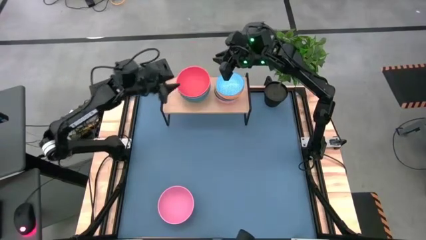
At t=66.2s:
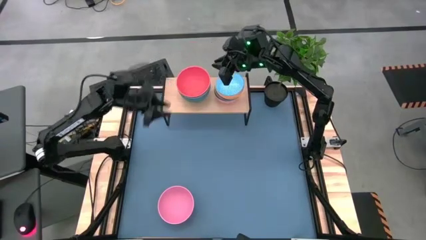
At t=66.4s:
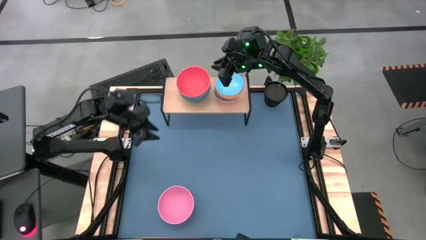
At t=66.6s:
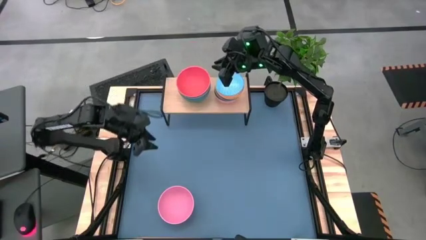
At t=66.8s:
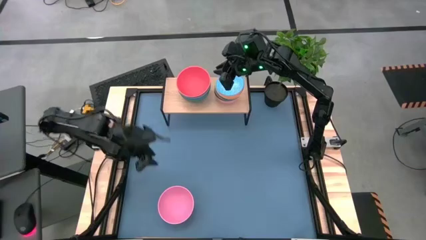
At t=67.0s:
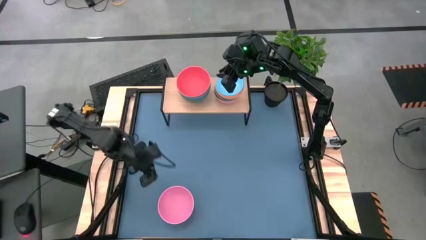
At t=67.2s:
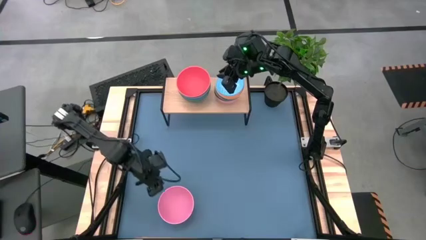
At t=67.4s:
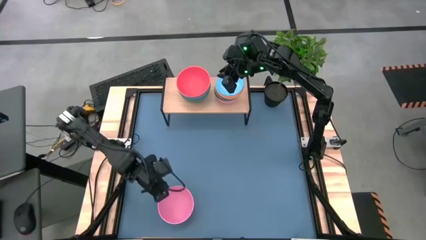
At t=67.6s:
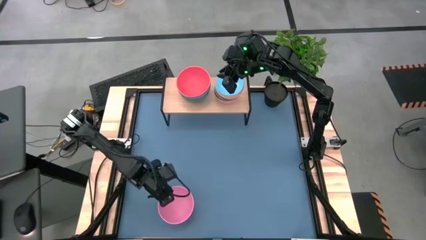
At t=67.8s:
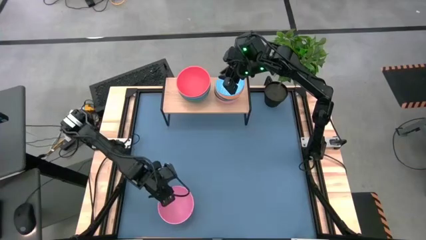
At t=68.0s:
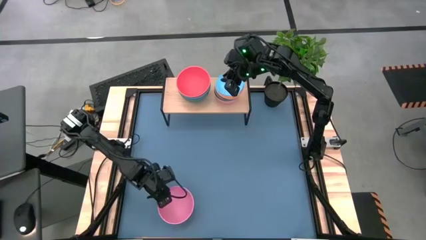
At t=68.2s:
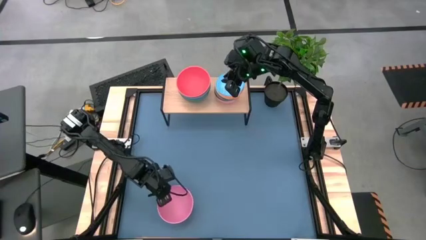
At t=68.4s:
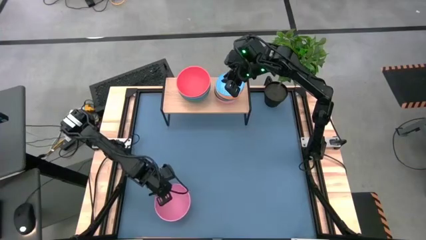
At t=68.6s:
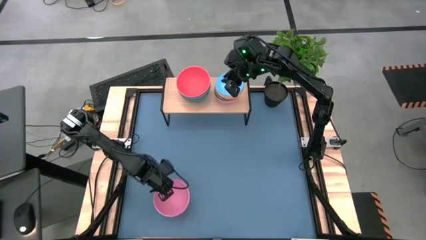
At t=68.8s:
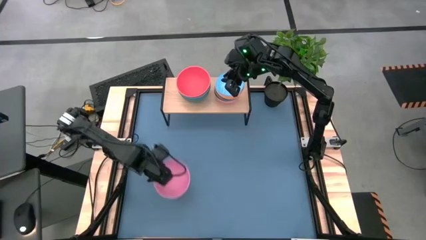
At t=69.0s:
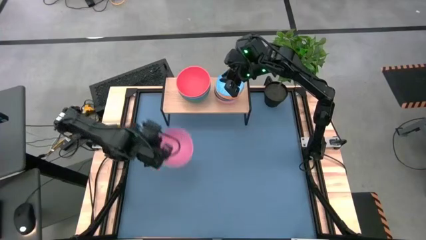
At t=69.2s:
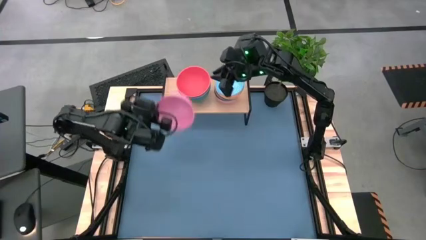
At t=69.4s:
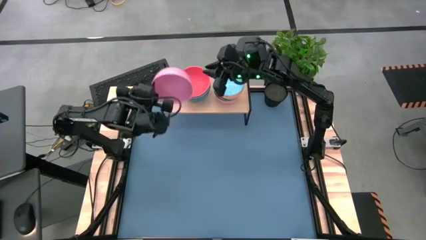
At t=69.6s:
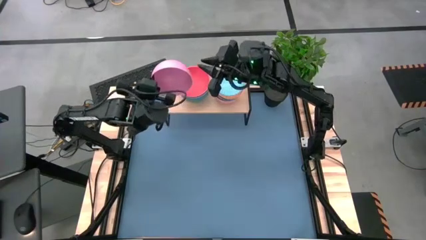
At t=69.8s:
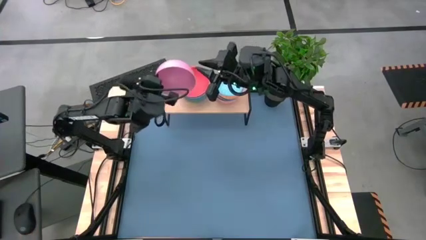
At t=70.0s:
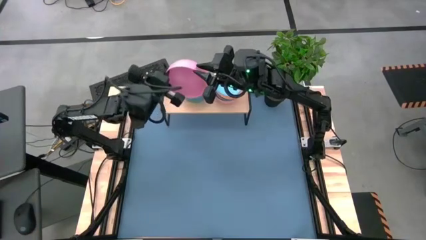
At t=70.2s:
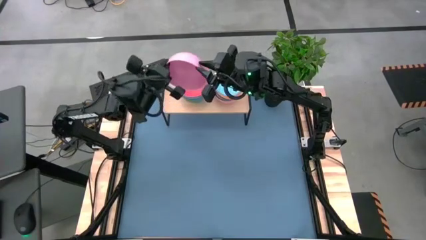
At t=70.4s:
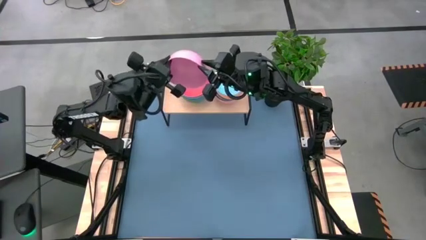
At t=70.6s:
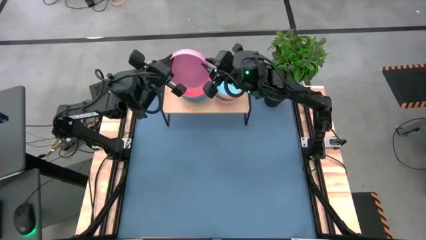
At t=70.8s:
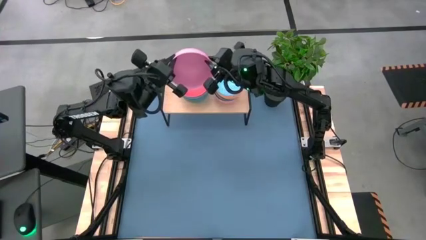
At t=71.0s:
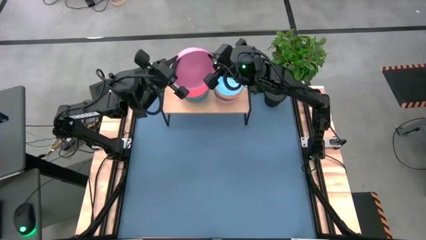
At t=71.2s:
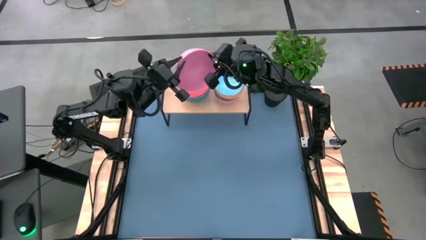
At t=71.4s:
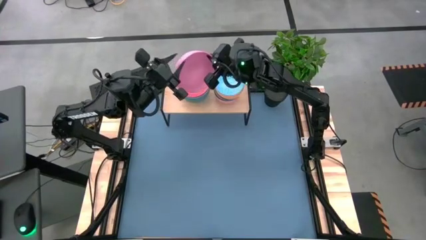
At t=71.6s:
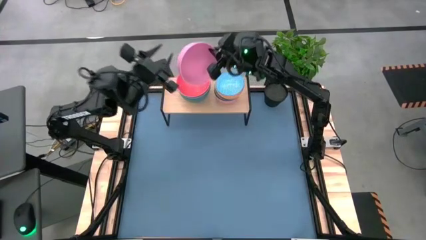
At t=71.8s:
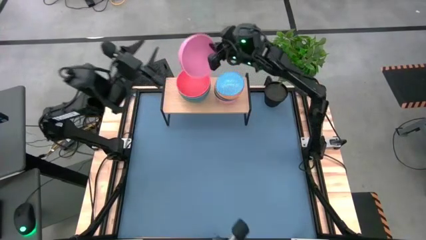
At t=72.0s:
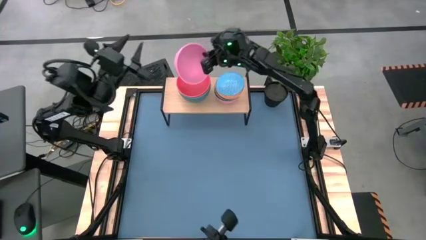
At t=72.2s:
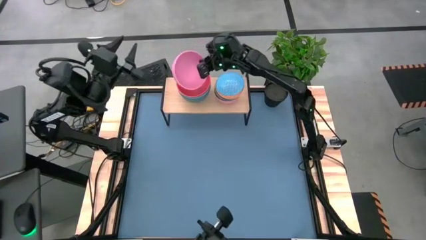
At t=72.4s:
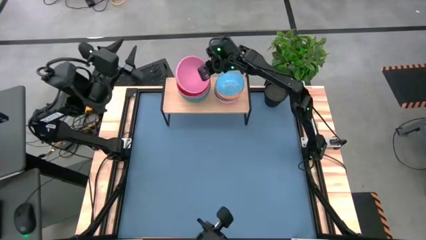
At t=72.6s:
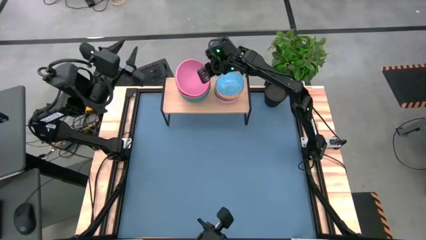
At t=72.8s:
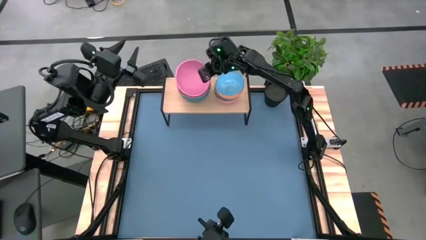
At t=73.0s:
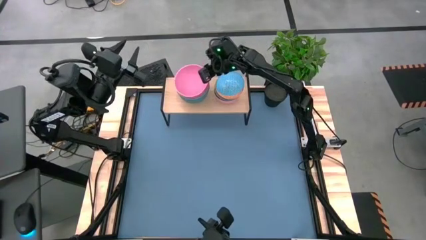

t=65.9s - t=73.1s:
Task: Place and stack bowls onto a shelf
Stack the pink bowl on top of the red bowl on the shelf

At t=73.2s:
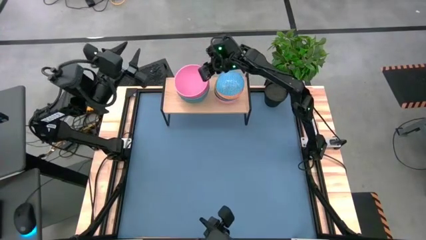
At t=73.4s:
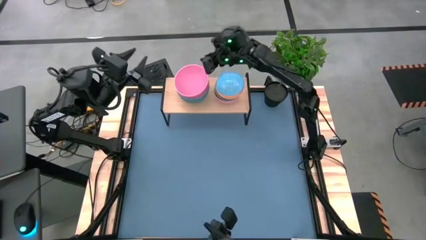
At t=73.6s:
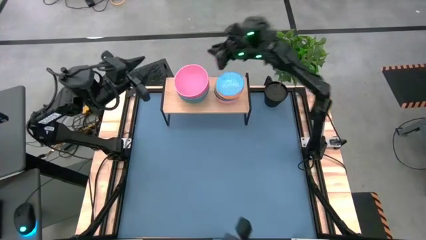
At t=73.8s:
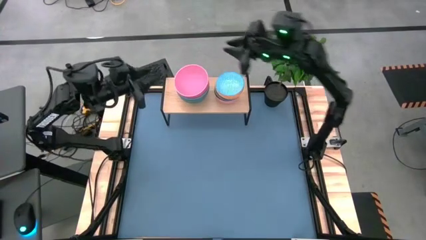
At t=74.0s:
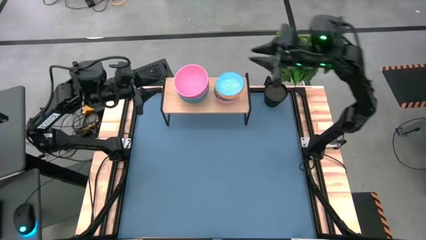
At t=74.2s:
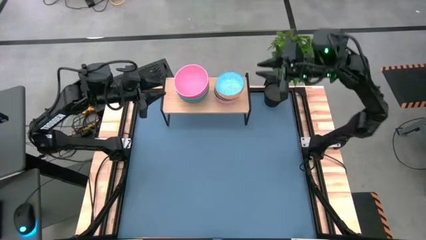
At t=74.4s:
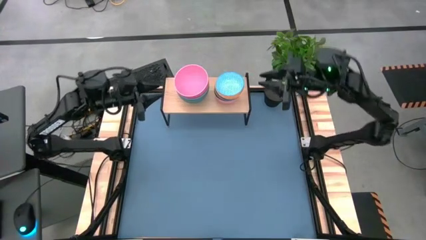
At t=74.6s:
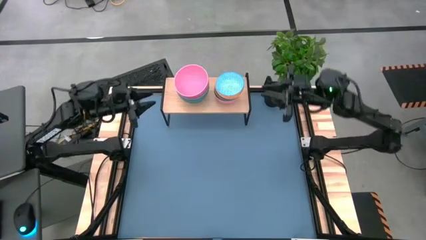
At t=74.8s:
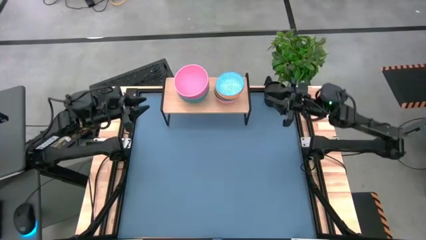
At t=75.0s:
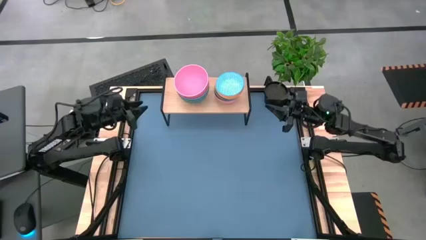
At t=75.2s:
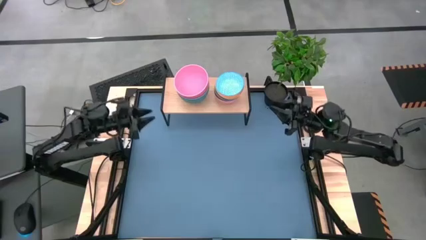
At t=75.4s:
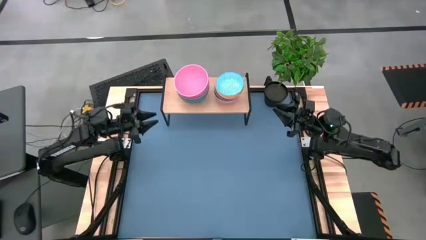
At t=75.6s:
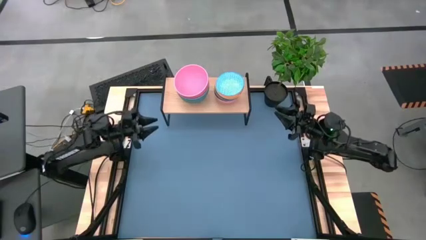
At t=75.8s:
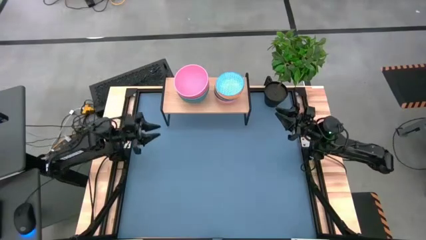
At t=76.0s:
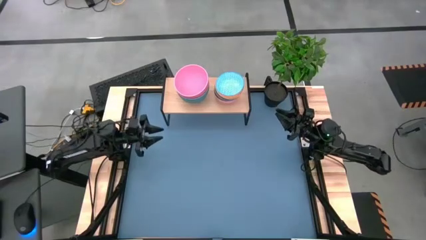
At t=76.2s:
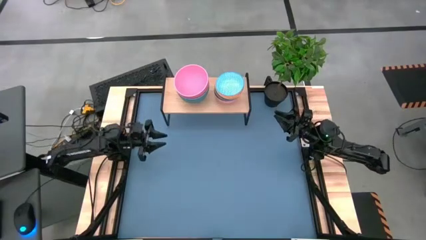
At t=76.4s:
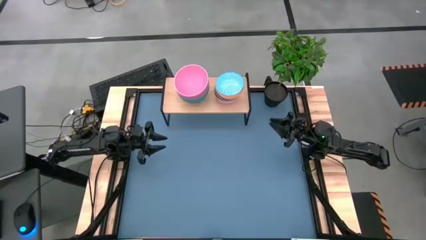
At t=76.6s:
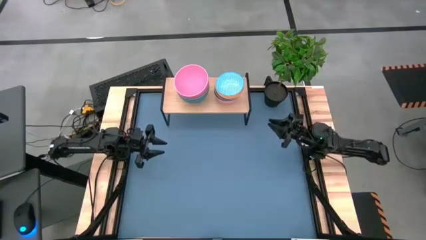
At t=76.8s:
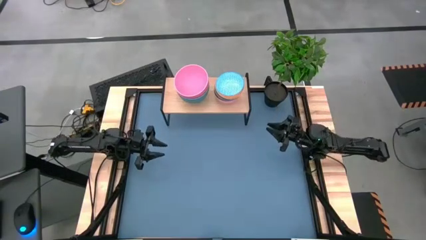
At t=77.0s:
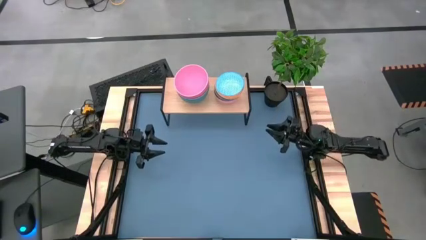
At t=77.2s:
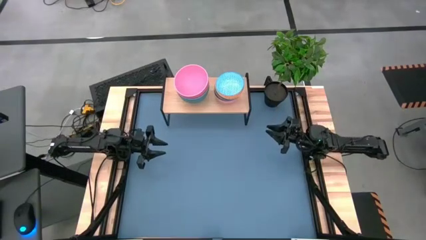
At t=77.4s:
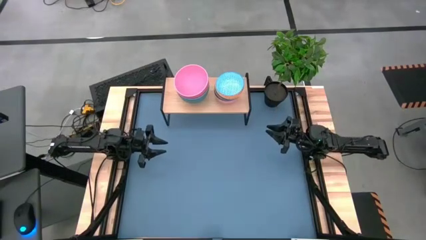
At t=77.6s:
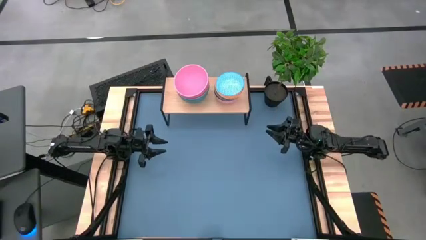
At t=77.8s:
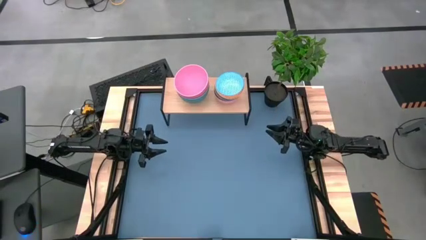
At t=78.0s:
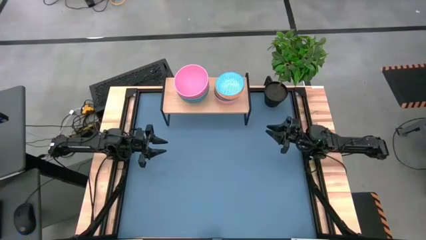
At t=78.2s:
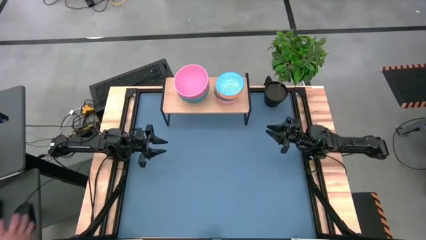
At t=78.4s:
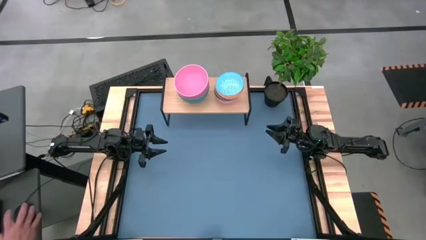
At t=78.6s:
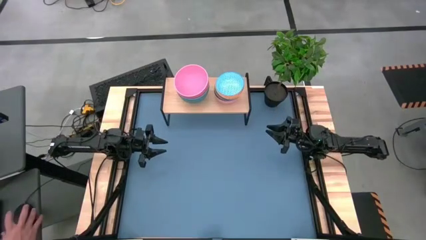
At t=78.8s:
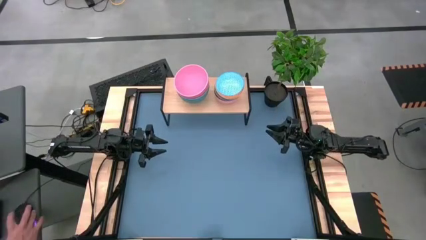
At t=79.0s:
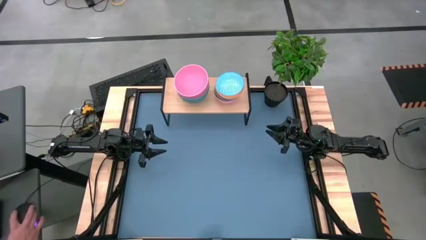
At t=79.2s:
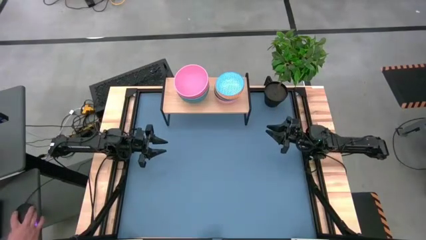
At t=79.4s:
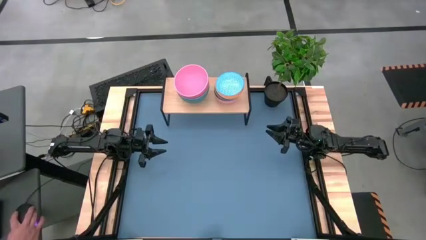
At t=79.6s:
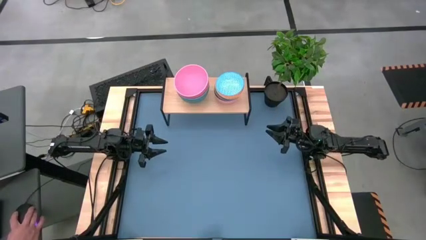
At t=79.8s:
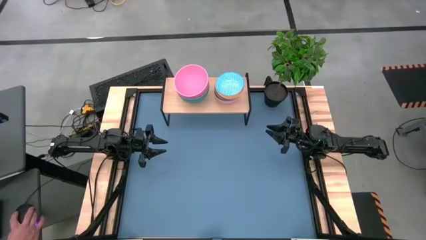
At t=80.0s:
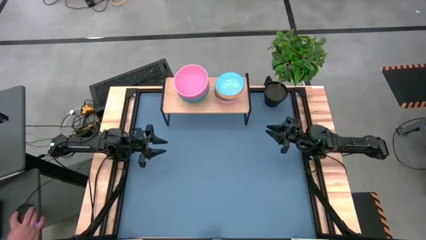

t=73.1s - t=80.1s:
Return to Home Position
